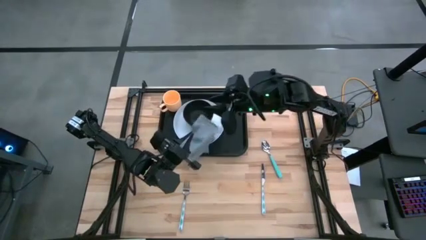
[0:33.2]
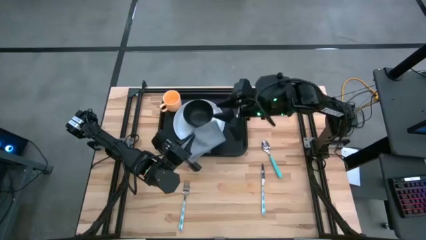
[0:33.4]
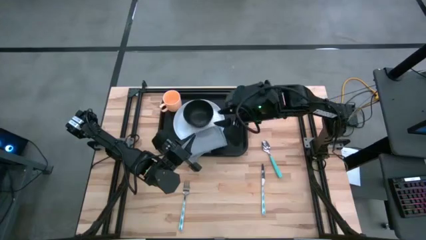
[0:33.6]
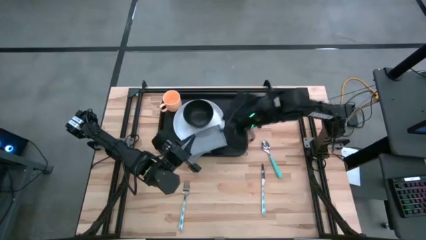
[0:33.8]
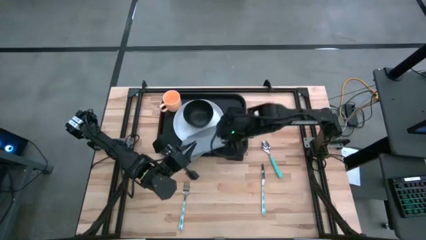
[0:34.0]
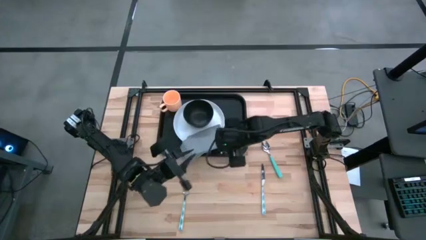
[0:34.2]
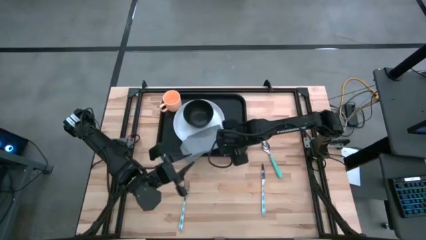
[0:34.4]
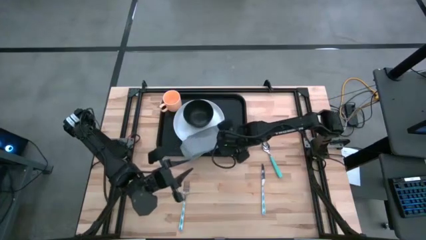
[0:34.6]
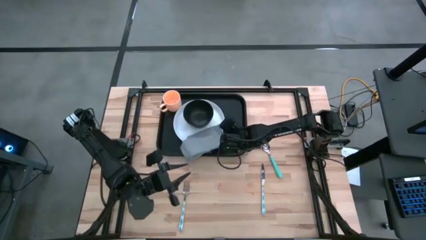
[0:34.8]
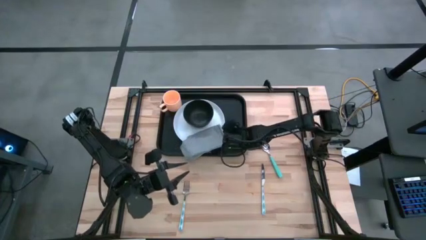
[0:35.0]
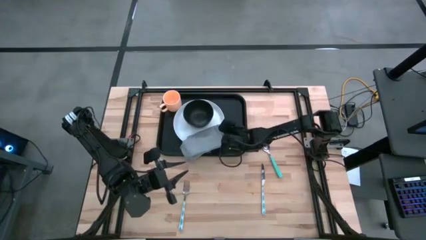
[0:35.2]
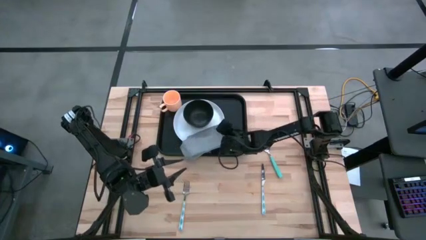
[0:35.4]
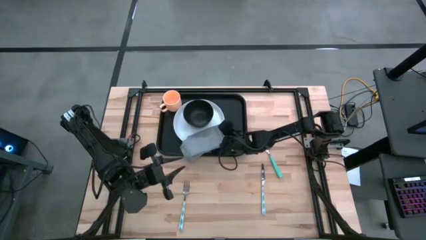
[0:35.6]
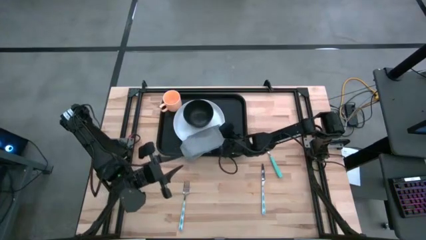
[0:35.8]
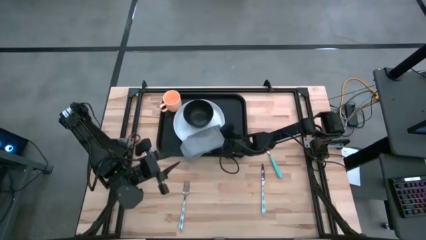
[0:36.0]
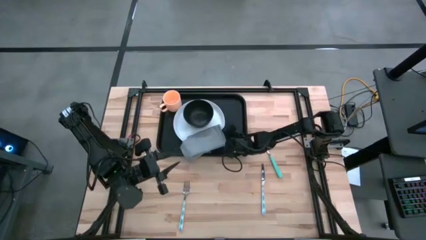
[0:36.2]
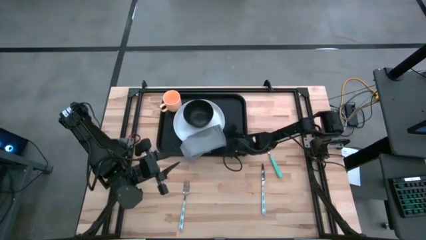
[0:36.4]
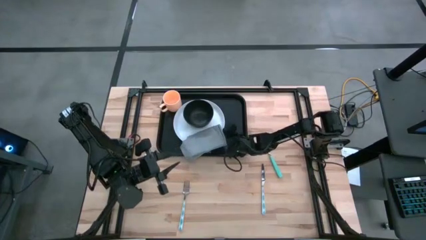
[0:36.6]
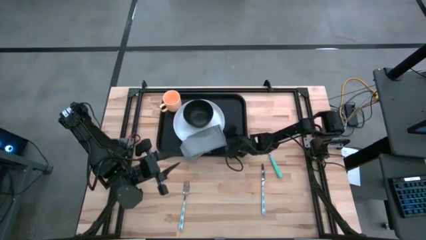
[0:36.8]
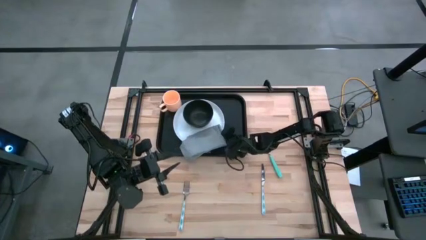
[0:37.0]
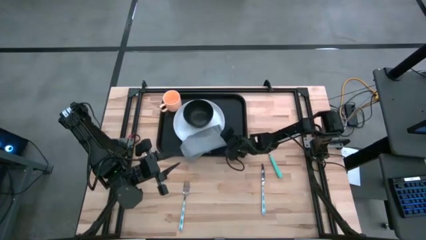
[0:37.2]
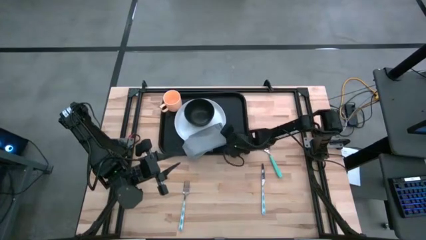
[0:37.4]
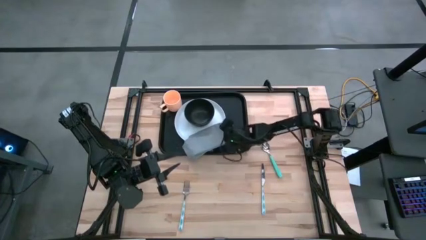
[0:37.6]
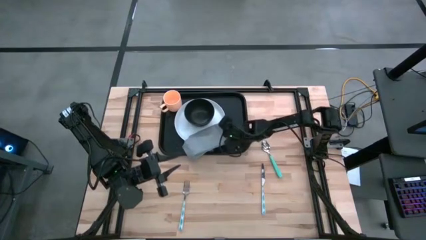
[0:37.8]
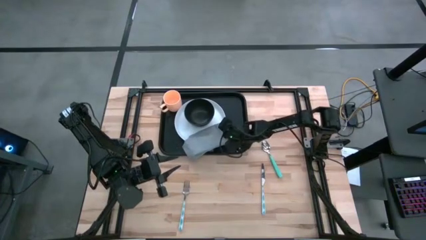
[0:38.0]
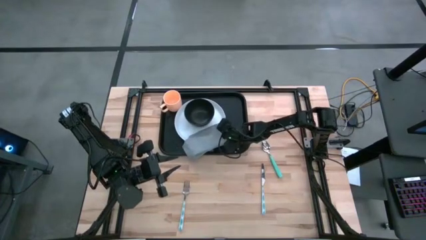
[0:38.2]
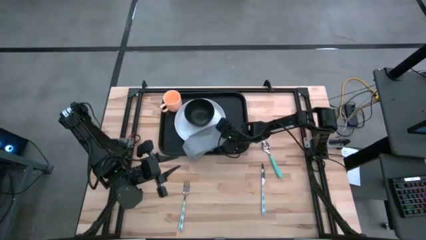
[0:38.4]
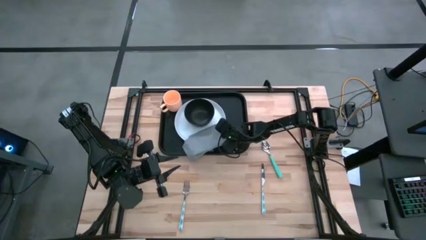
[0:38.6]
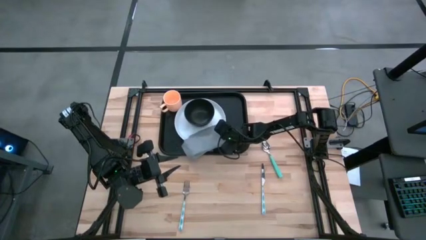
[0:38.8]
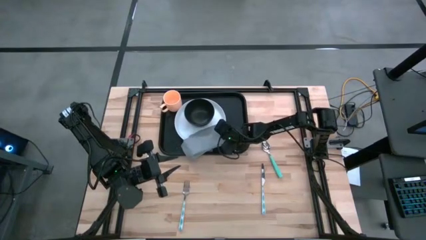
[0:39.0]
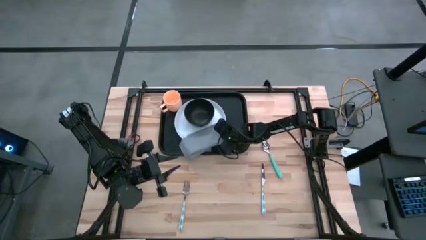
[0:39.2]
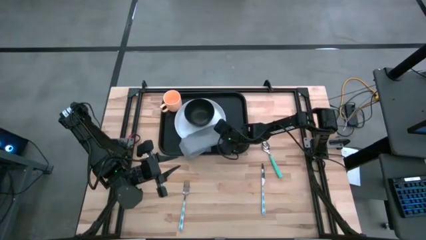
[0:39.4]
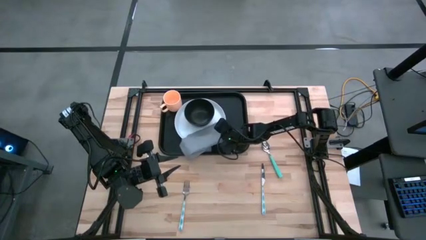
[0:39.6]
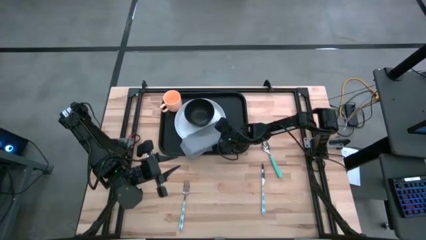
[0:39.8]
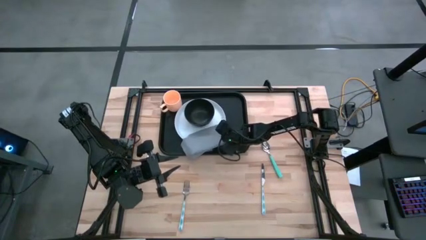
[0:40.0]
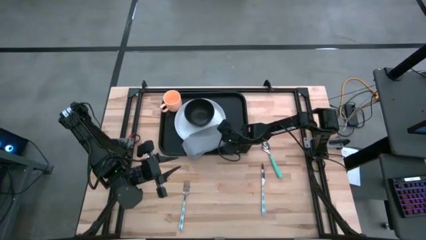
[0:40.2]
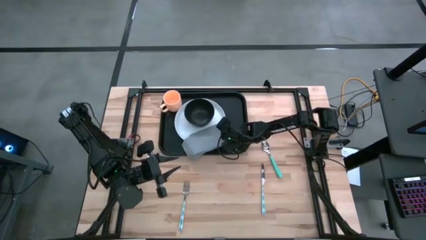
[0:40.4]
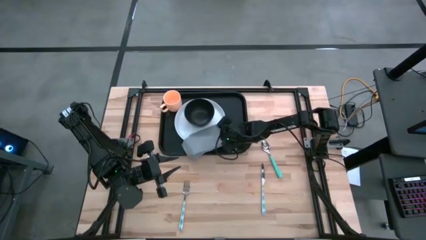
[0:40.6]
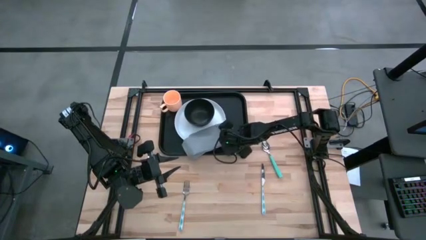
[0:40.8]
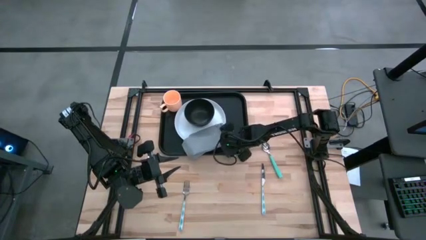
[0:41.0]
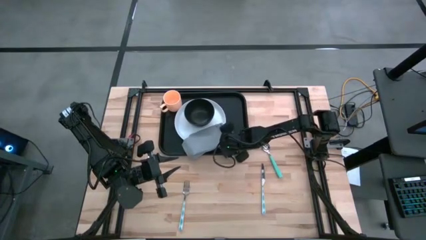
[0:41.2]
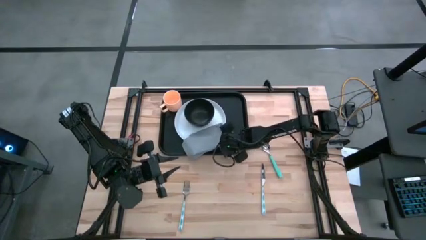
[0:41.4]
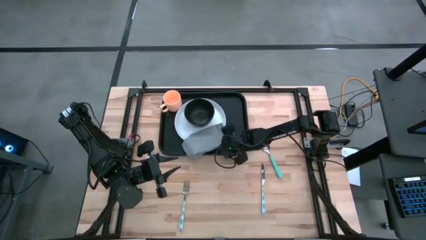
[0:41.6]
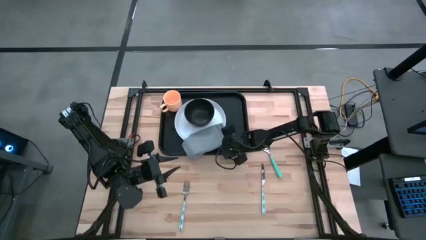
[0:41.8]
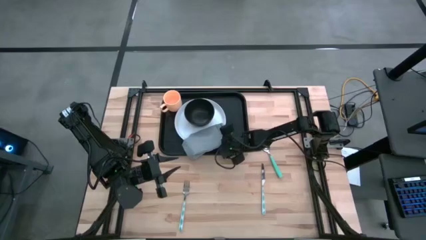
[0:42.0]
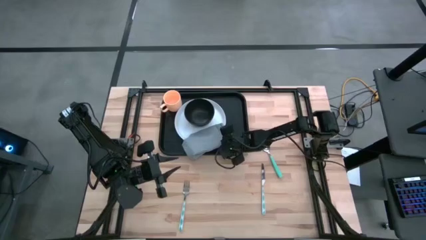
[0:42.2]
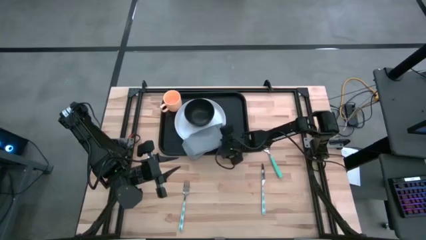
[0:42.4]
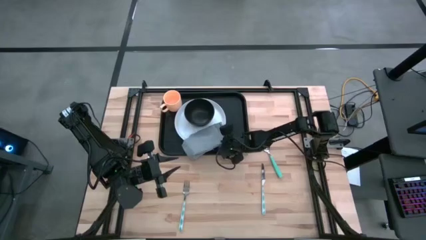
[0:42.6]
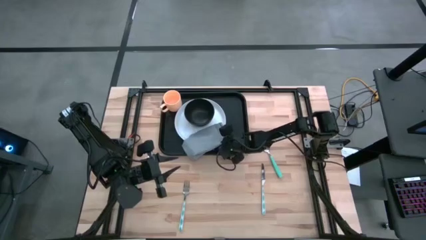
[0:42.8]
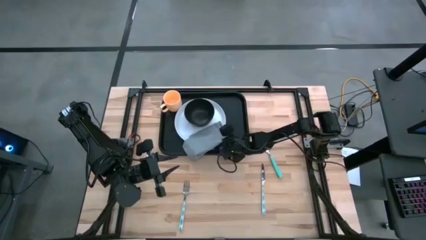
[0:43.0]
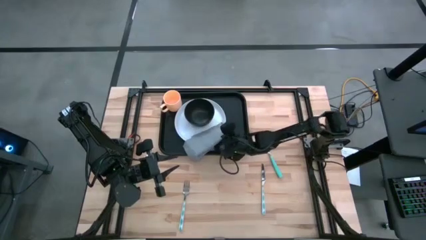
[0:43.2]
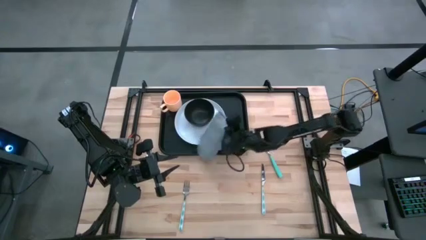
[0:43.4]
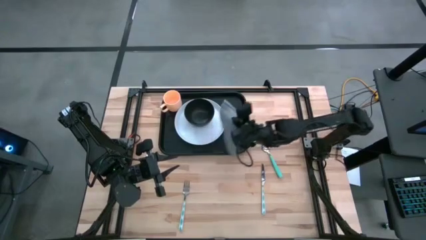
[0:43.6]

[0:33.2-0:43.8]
Task: Set up tray
Put the napkin to the right of the plate on the serving tray

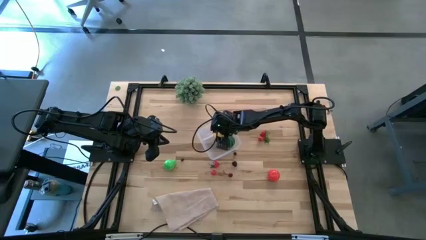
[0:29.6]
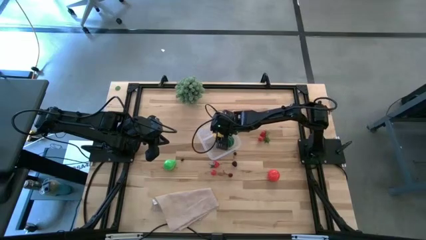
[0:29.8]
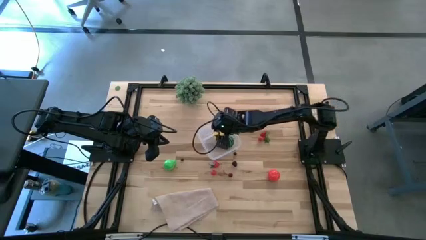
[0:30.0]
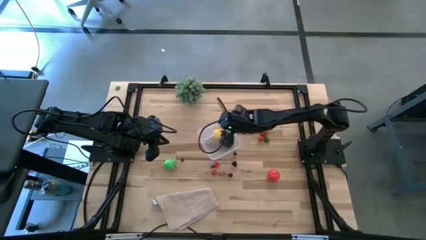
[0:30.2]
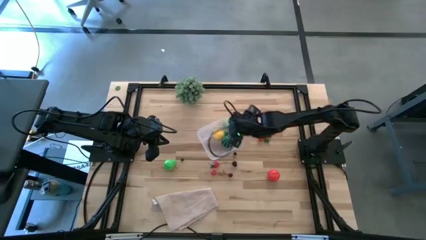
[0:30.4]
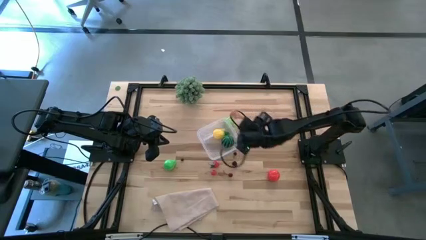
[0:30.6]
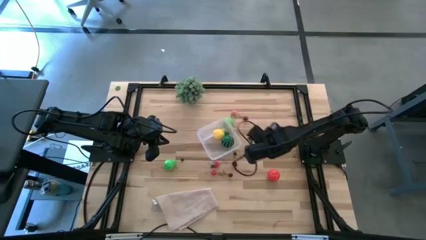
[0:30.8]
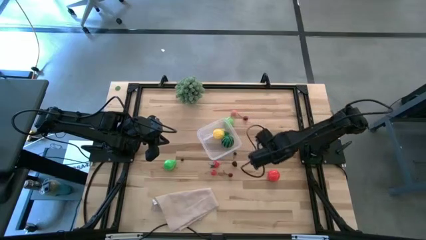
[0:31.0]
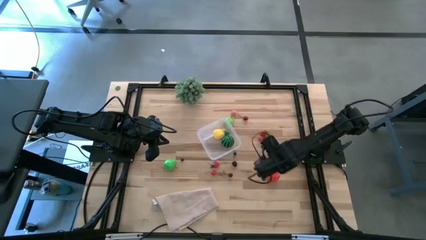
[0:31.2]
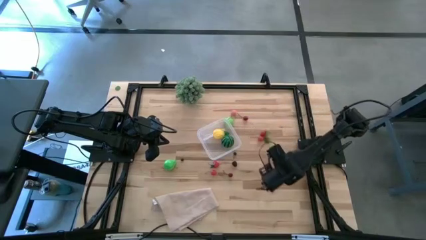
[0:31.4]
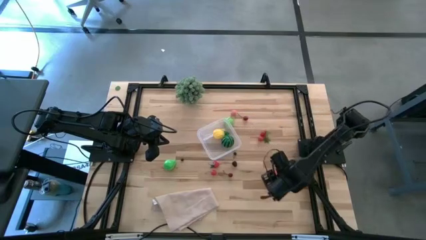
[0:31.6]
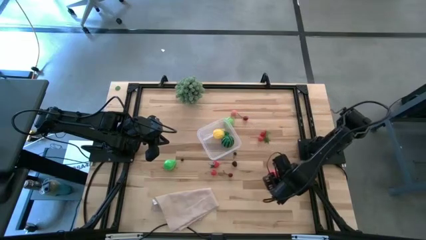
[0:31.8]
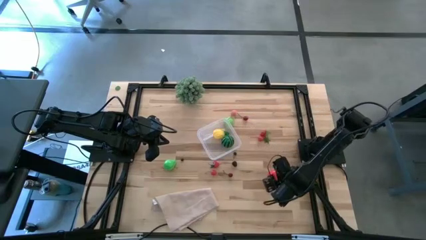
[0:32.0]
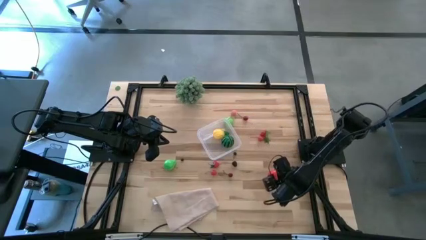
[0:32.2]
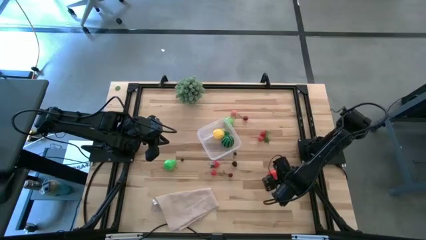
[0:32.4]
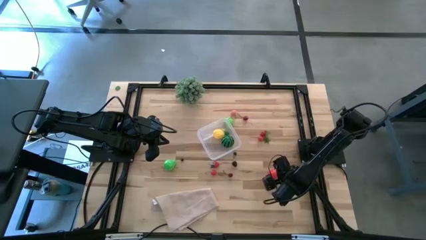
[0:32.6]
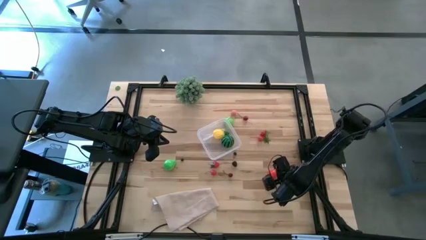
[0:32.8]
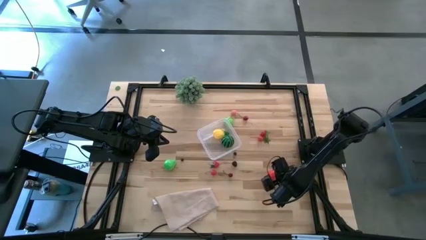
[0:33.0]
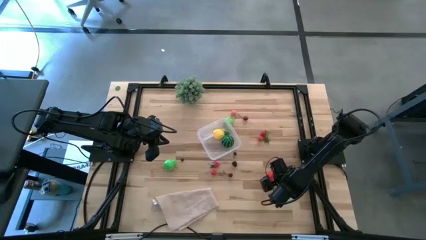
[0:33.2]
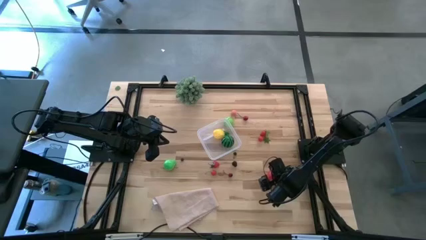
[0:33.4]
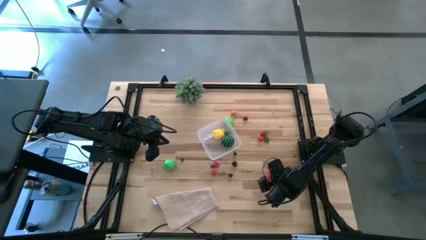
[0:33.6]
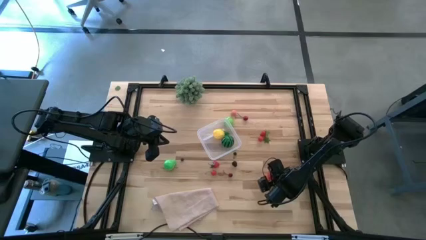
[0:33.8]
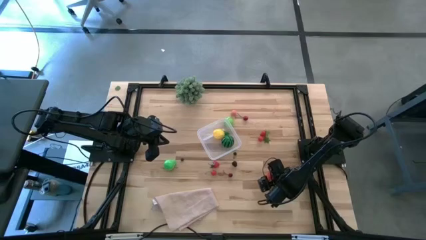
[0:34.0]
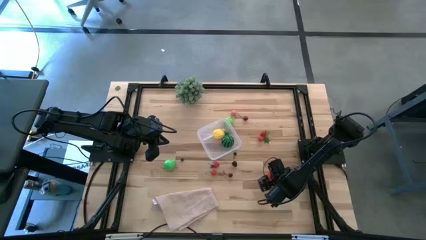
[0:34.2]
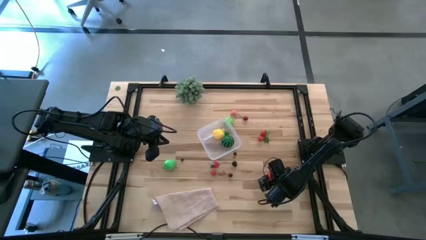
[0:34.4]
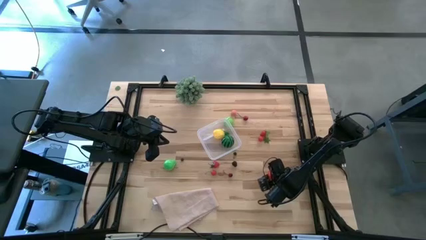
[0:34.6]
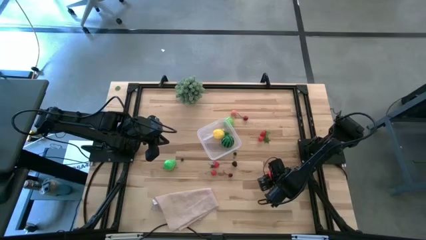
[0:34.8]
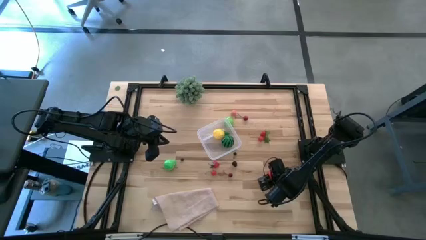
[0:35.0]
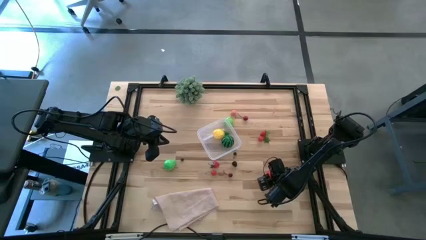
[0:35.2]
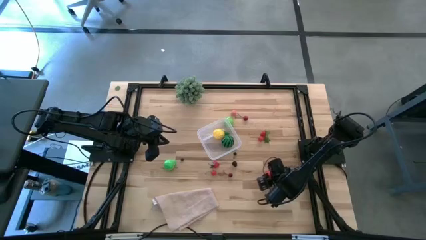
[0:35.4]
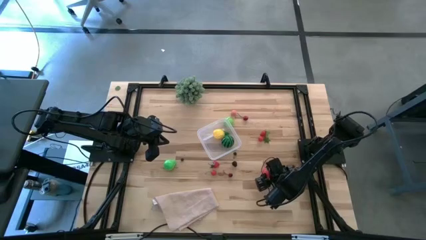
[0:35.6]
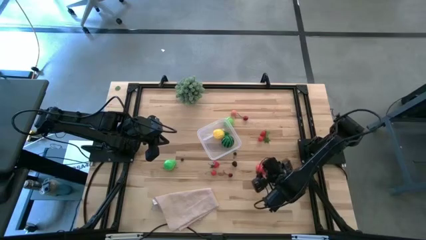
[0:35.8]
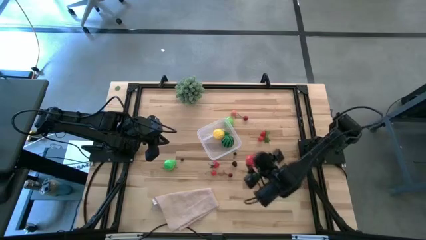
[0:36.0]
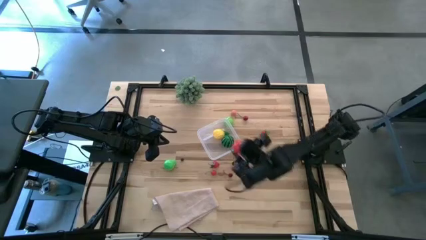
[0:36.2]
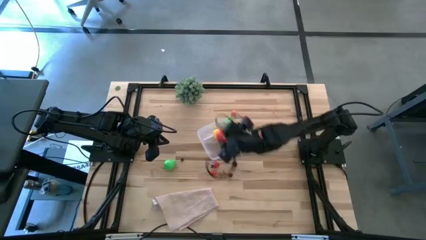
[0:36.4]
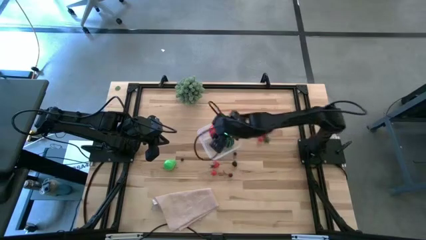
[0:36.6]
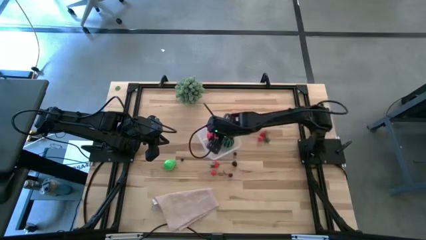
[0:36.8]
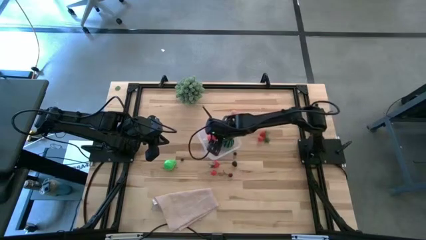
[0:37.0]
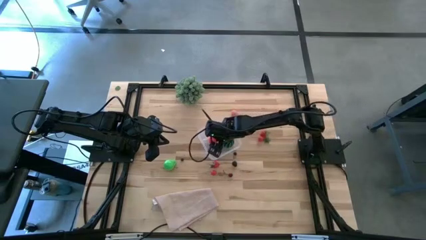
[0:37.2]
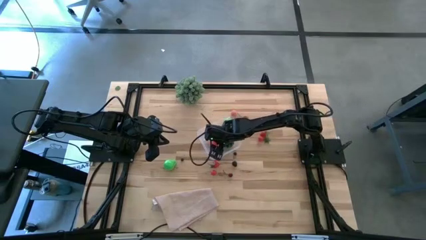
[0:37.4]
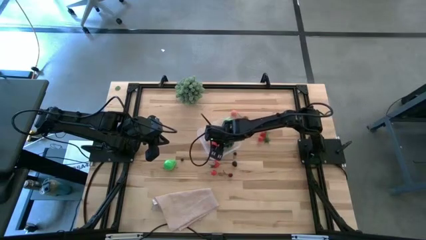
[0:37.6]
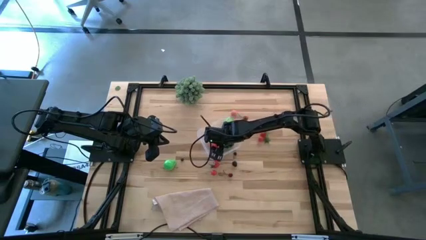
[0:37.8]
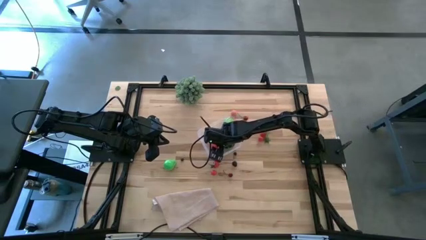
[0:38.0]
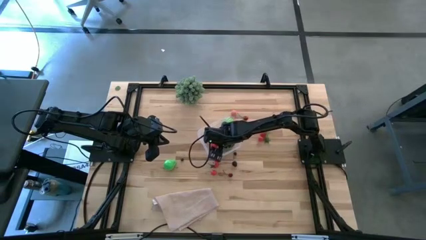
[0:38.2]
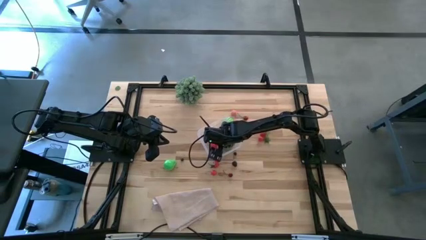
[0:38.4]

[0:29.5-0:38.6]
Task: Pick and placing Produce into tupperware
Put the red tomato into the transparent bin
